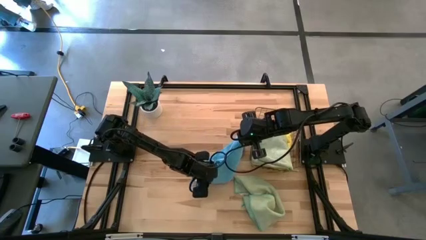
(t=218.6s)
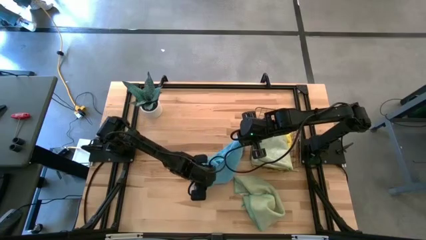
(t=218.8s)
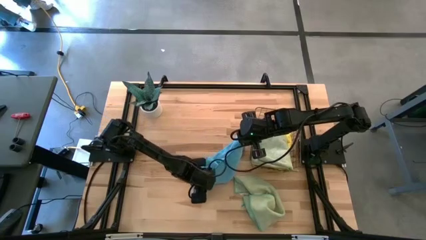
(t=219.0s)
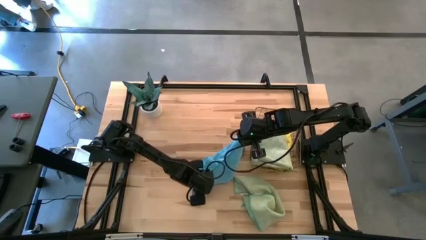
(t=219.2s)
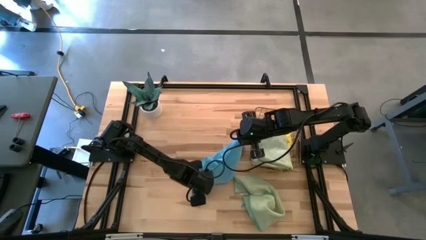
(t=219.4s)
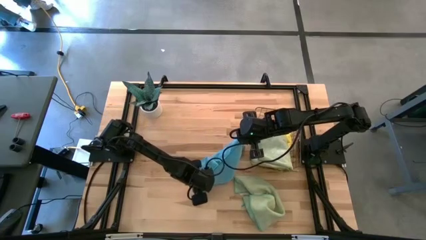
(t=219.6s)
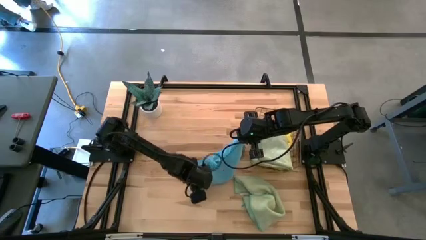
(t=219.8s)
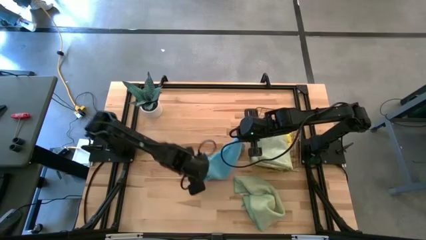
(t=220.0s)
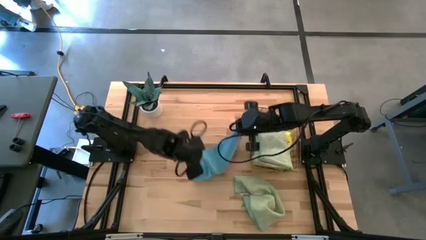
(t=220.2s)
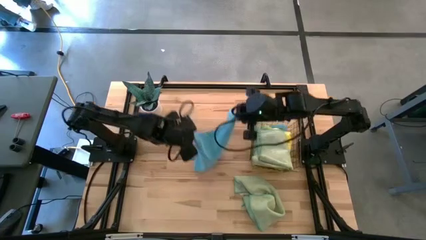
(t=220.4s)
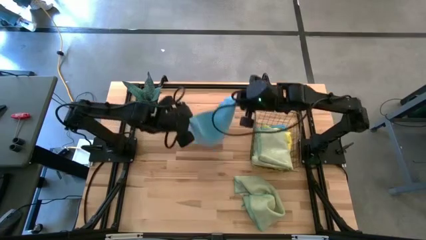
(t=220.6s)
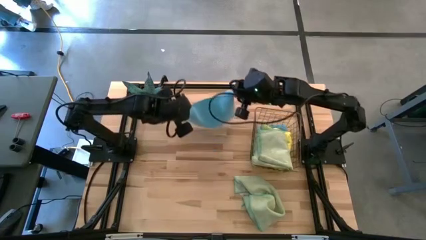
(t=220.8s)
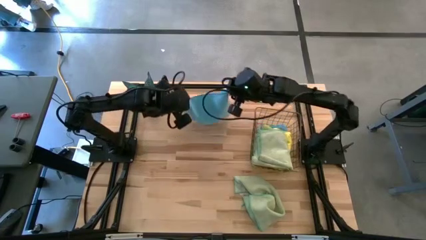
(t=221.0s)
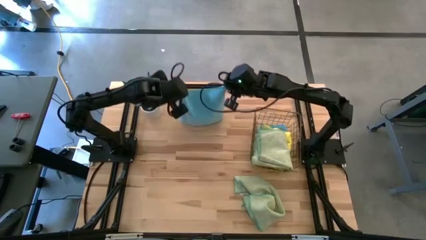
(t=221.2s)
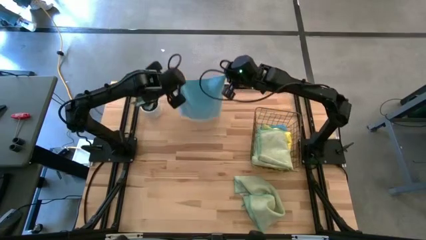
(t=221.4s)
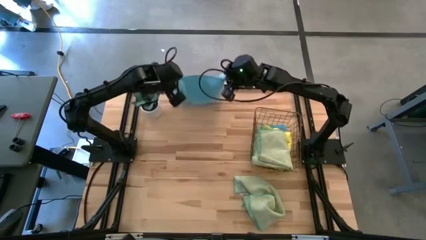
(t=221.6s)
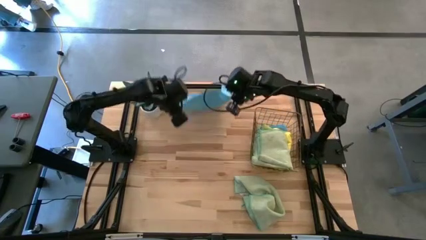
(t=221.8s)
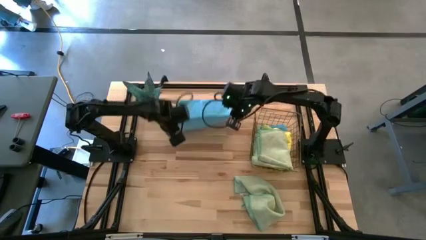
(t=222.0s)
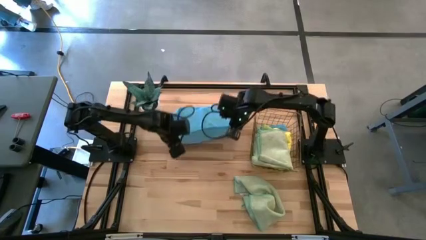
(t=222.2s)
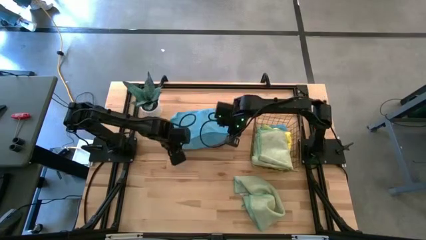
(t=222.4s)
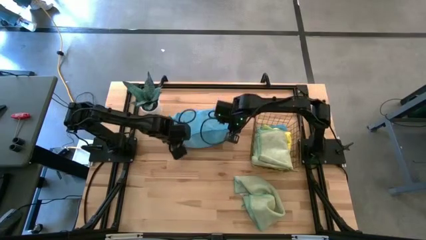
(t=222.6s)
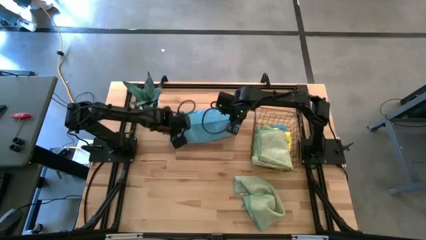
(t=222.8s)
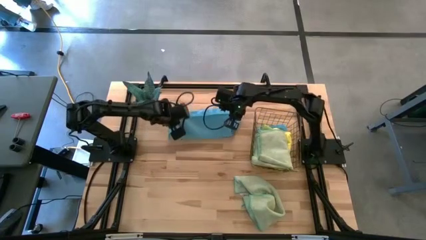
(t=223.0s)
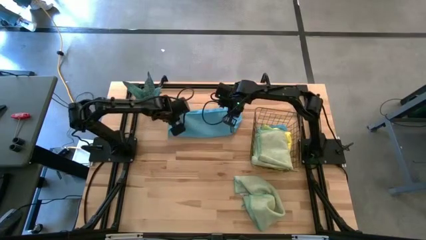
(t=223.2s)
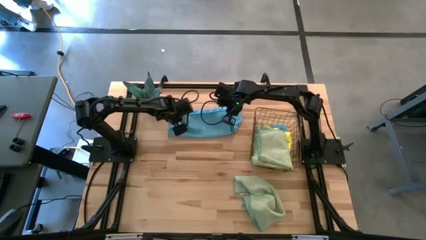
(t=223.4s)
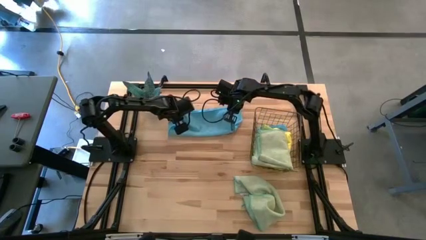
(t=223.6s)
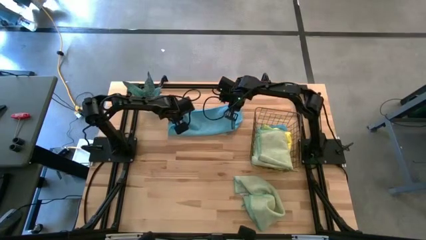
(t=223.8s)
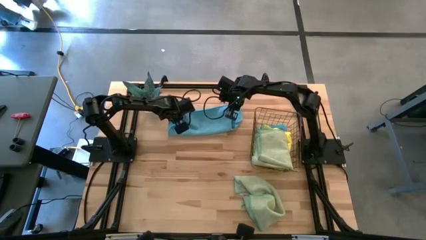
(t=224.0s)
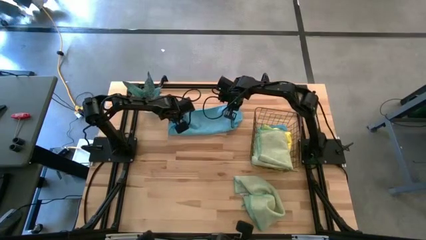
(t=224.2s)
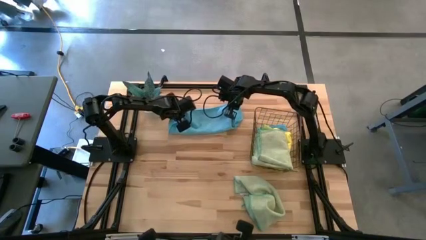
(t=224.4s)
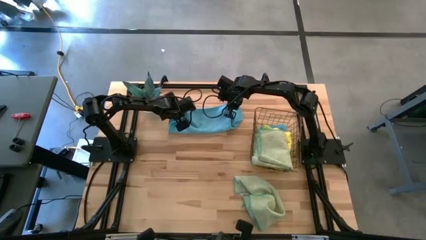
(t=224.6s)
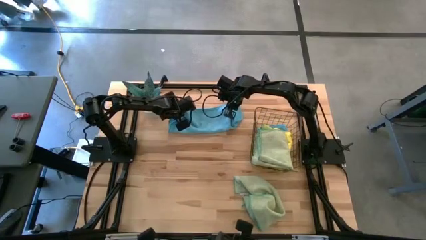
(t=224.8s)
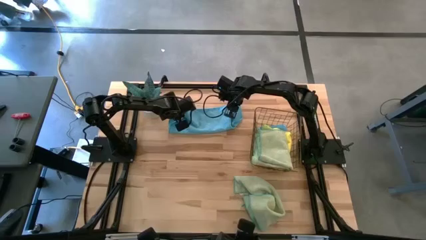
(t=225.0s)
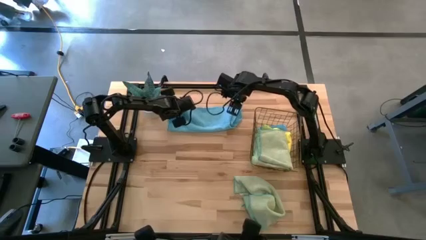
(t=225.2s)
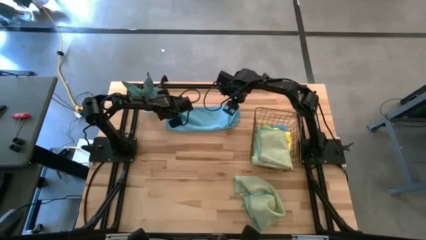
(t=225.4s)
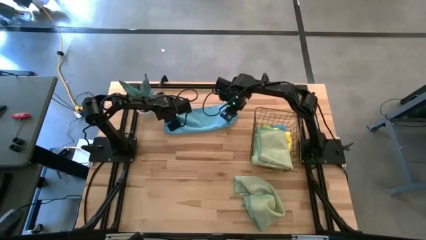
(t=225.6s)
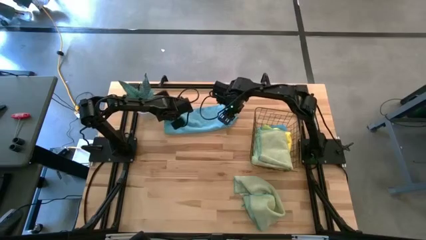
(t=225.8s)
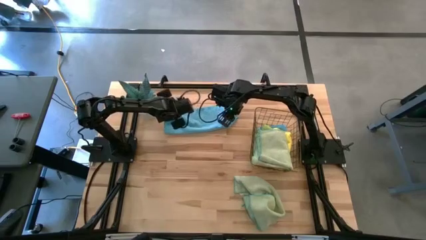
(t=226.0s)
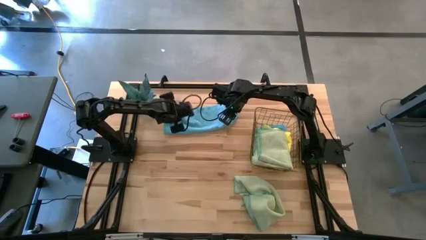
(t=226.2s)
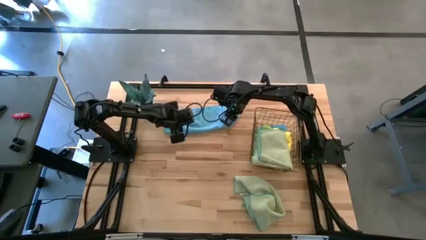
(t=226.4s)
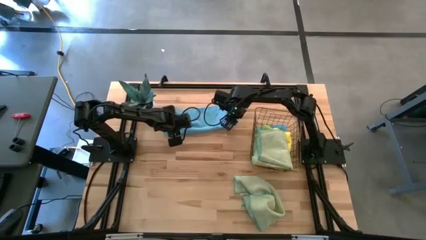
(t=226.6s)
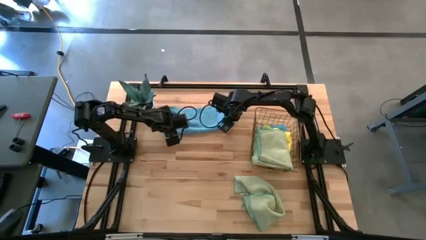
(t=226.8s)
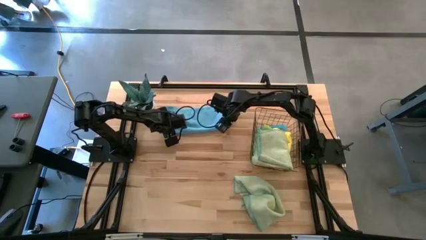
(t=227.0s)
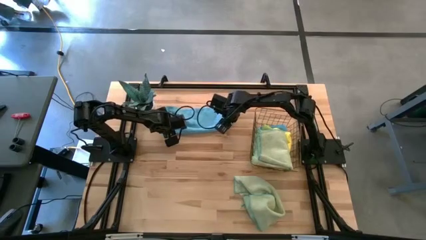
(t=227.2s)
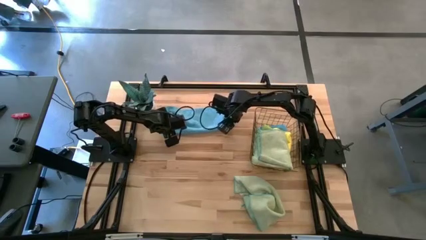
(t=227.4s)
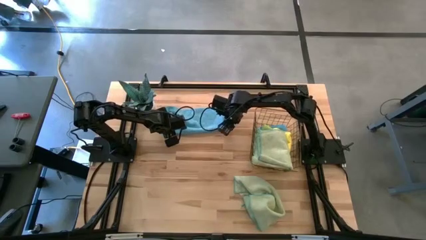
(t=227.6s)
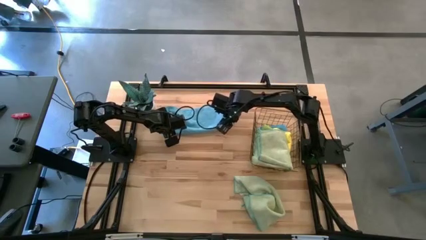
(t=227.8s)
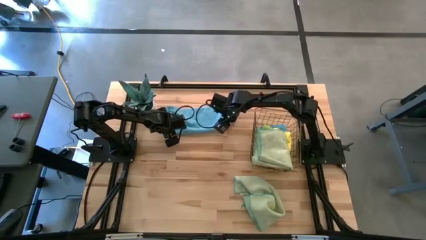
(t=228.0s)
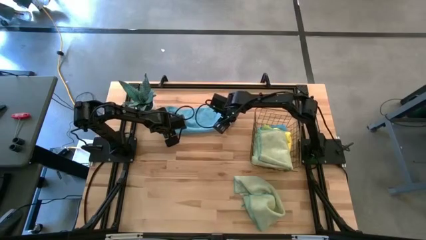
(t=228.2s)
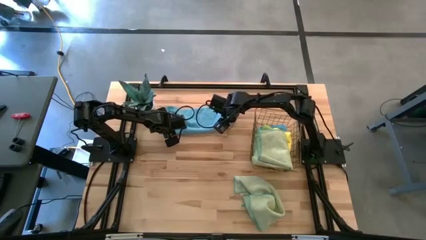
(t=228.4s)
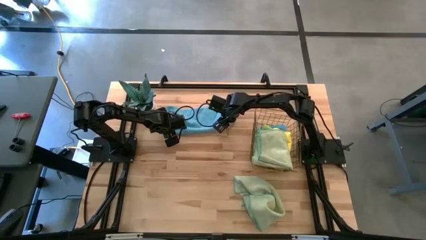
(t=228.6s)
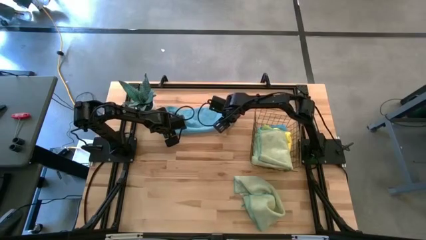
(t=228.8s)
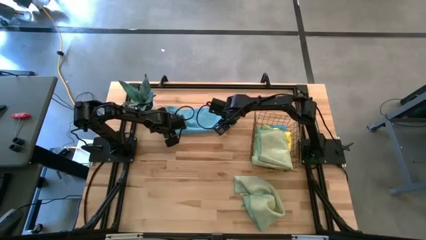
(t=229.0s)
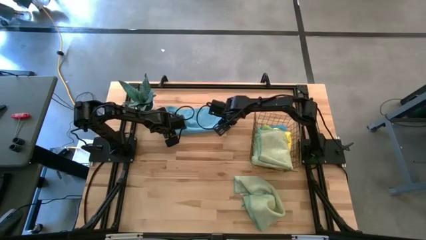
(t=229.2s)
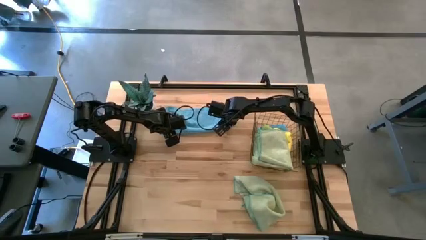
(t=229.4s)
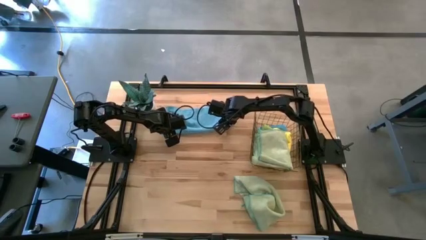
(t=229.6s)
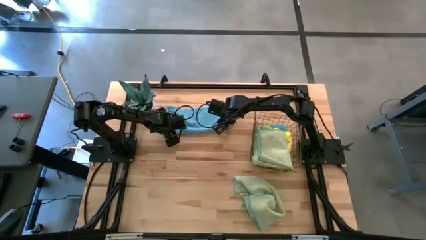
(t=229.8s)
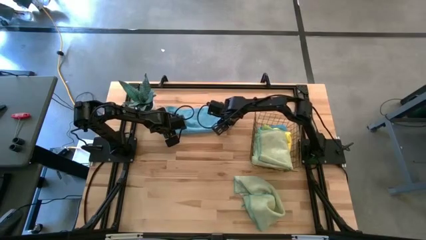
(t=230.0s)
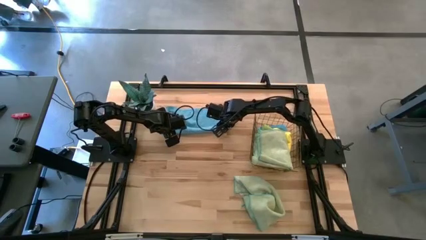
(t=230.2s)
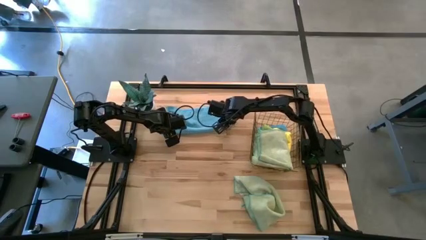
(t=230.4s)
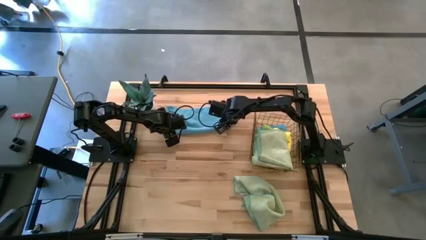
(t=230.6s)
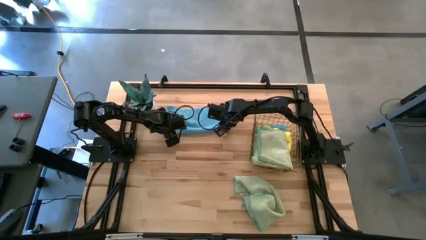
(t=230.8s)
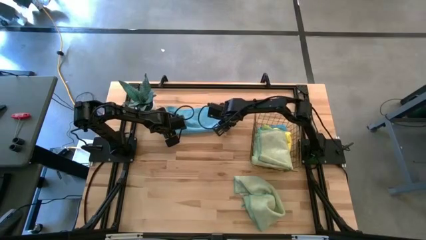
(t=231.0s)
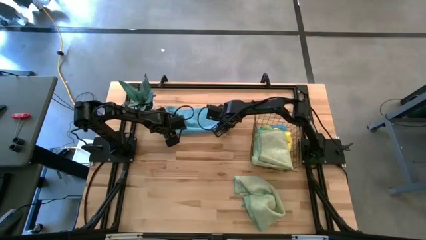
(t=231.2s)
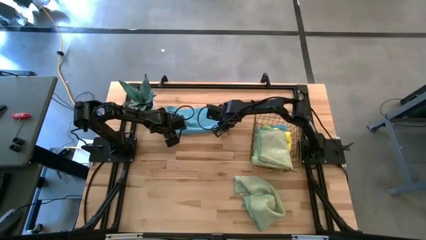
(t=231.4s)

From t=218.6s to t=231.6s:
Task: Fold microfiber towels
Fold the blue microfiber cloth

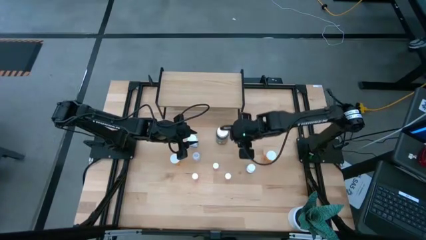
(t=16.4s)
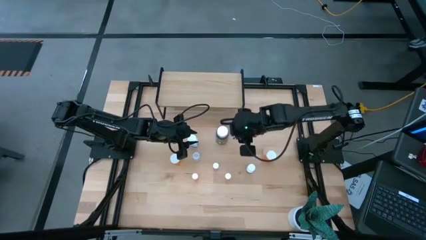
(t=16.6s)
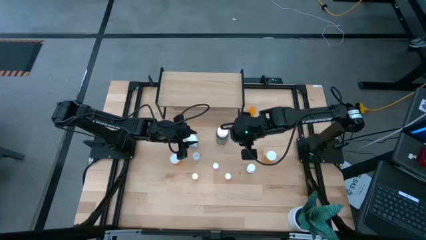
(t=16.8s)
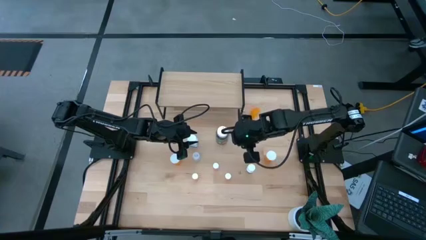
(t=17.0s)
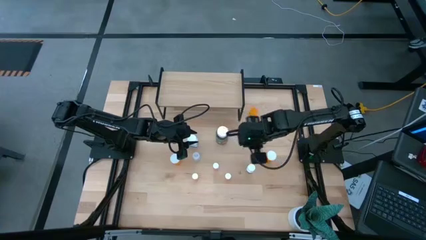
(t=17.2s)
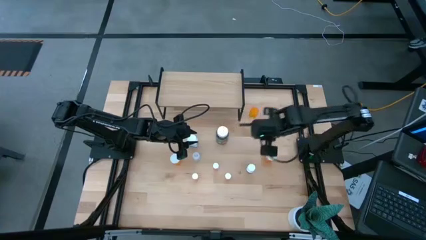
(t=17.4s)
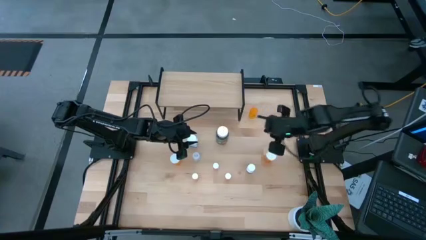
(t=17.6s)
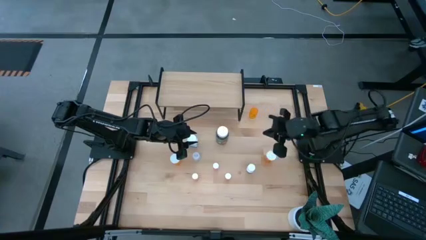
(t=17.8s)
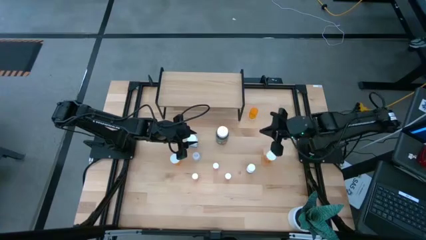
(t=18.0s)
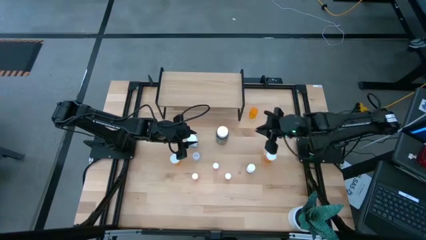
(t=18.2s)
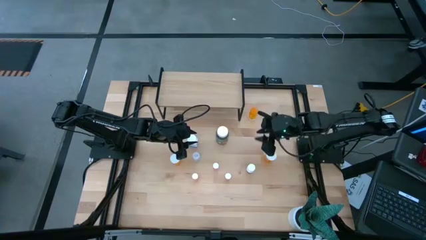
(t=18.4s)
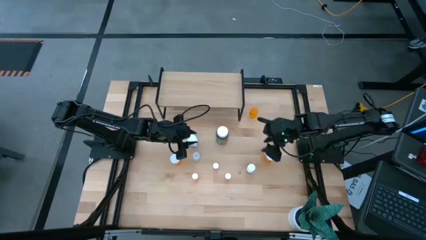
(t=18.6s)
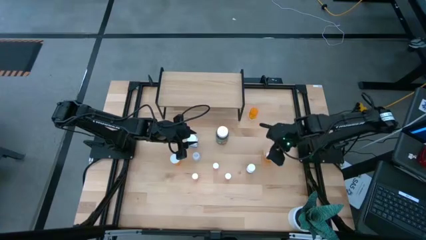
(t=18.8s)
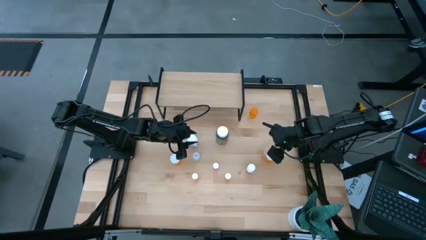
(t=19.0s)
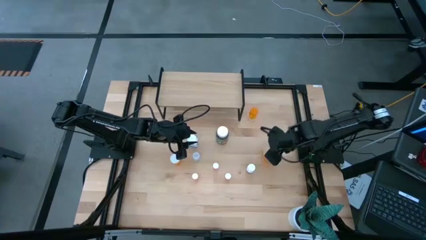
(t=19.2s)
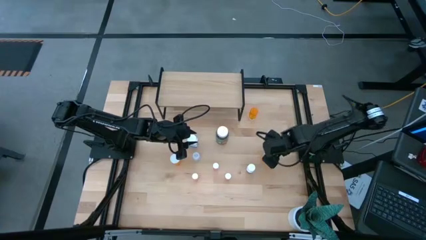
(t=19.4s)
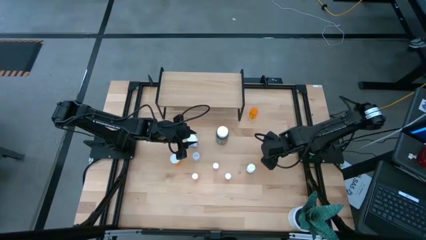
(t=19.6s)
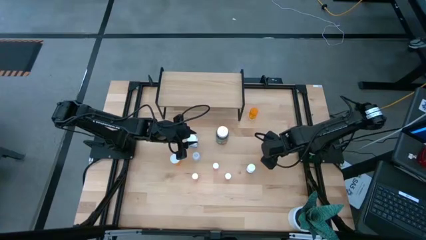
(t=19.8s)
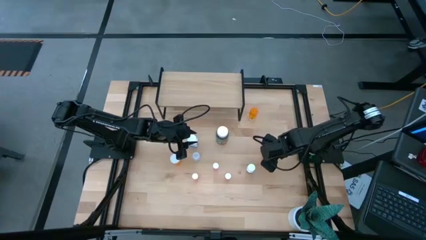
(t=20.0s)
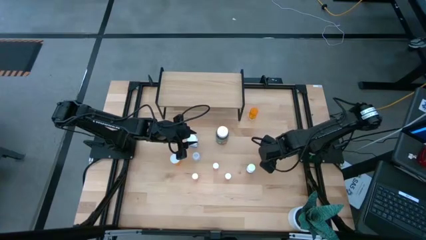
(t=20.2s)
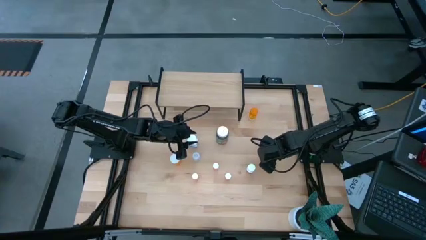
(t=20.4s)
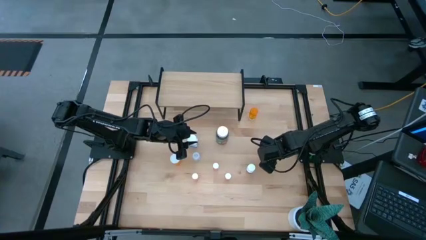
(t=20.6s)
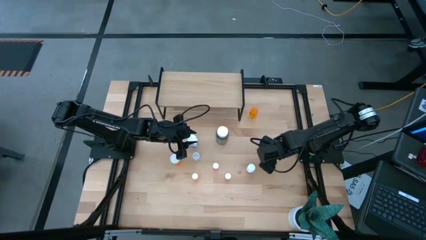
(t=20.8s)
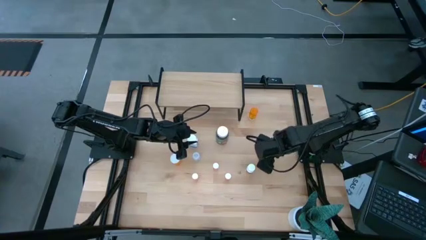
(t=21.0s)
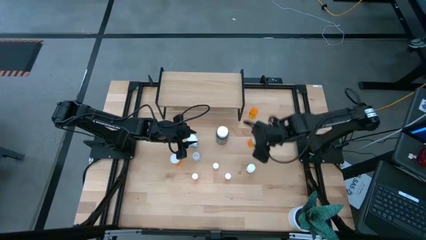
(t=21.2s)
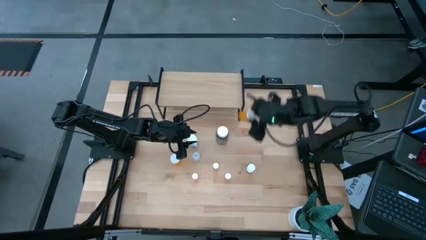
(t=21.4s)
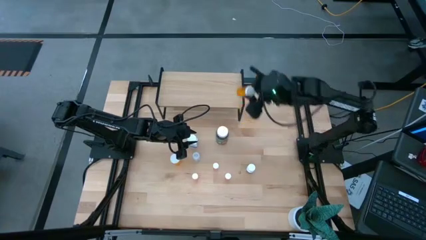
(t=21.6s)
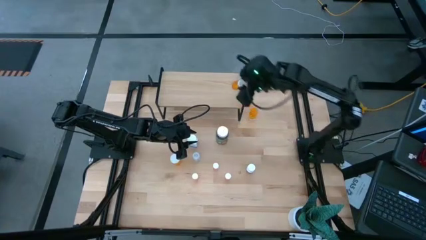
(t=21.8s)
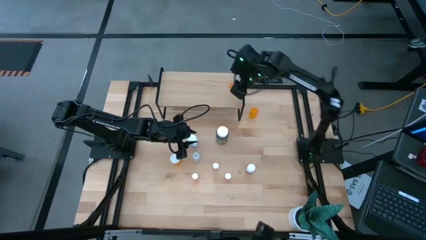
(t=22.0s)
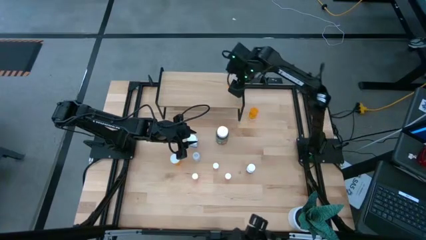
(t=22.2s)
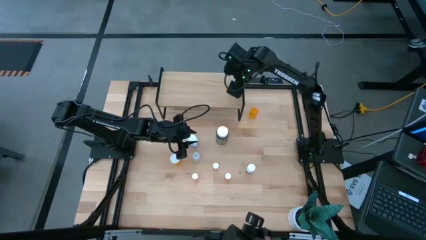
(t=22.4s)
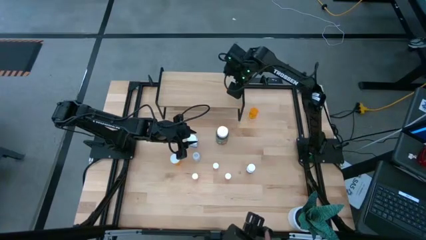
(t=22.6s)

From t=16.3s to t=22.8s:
Task: Pick and place medicine bottles onto shelf by color
Put the right orange pill bottle on the shelf
